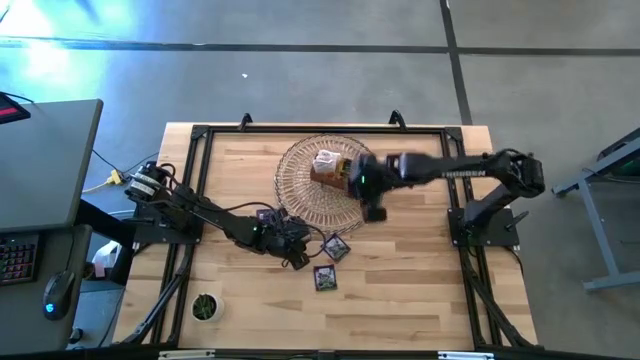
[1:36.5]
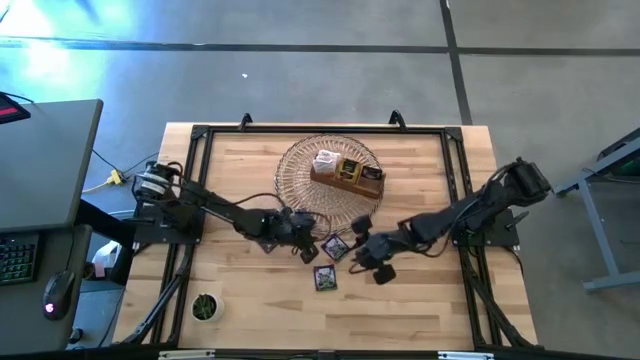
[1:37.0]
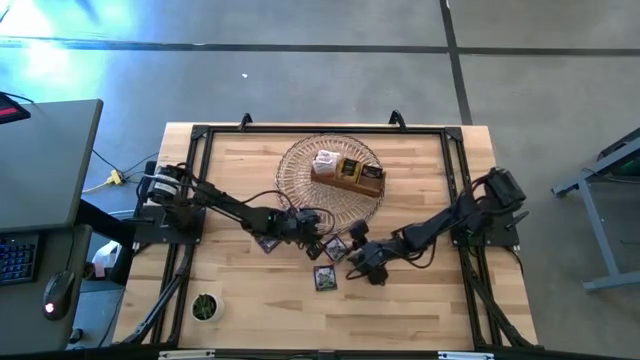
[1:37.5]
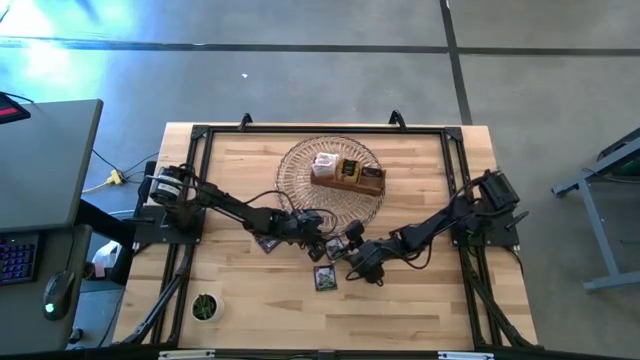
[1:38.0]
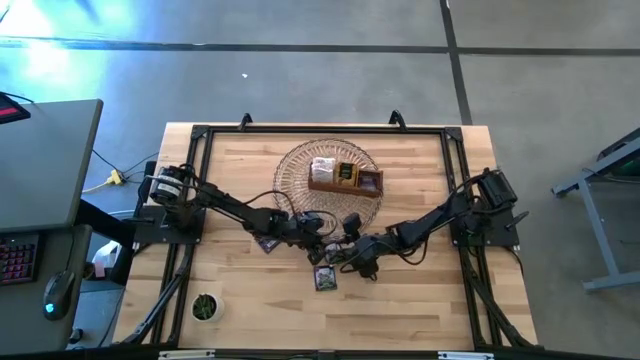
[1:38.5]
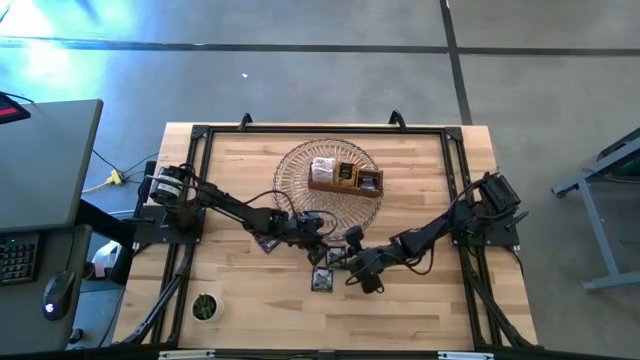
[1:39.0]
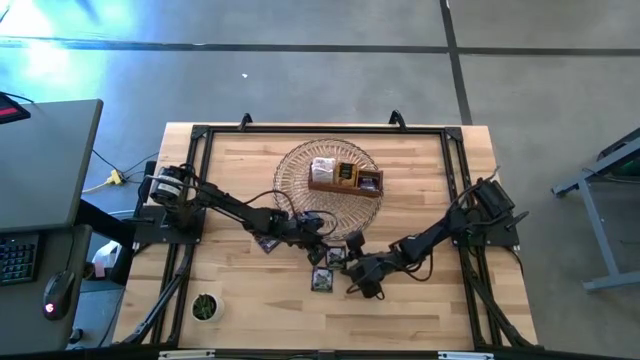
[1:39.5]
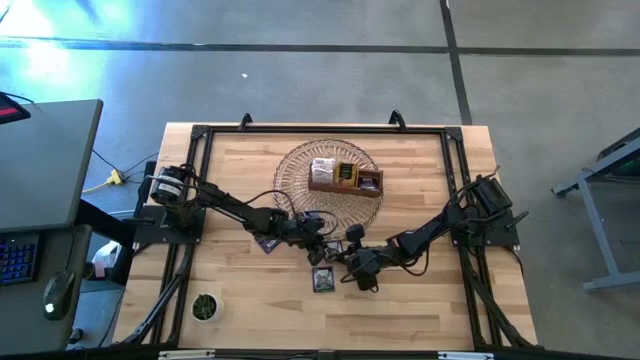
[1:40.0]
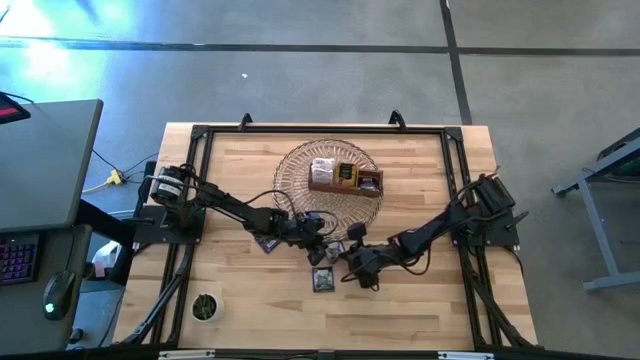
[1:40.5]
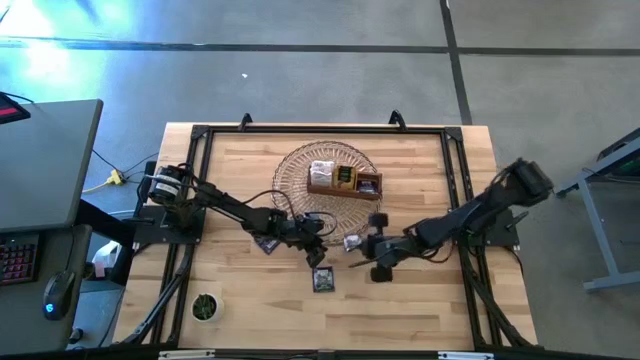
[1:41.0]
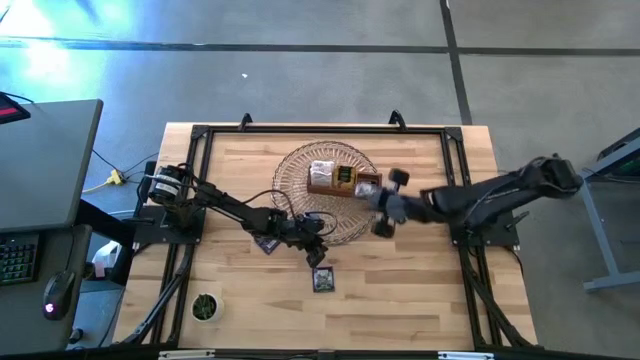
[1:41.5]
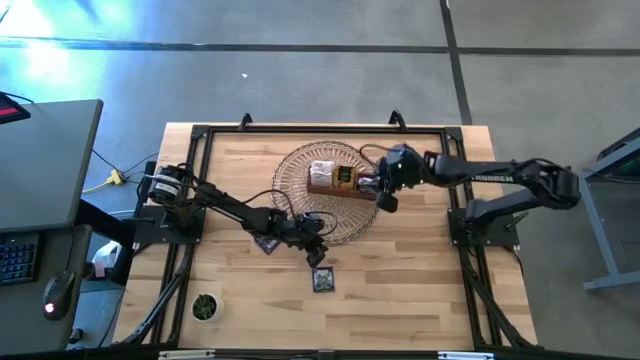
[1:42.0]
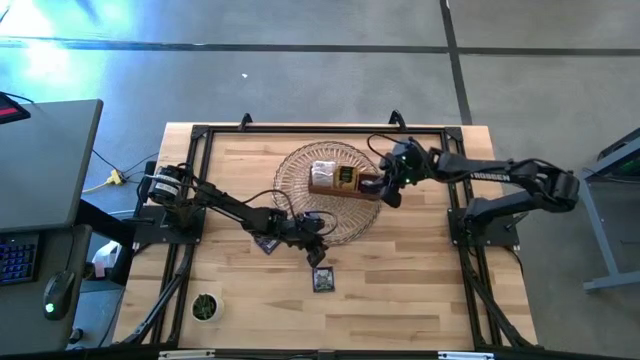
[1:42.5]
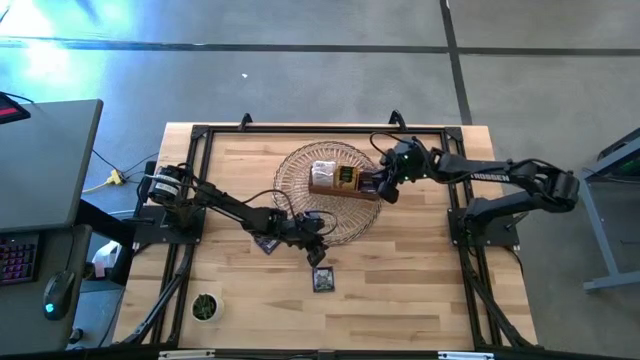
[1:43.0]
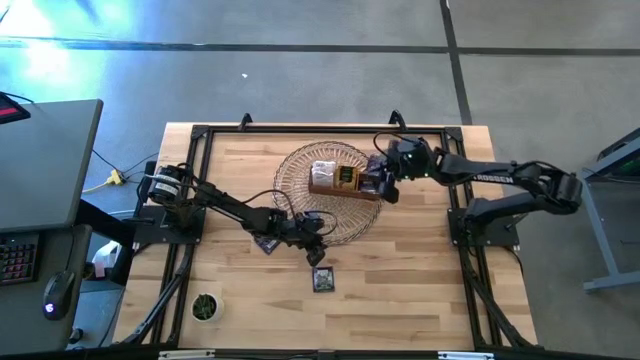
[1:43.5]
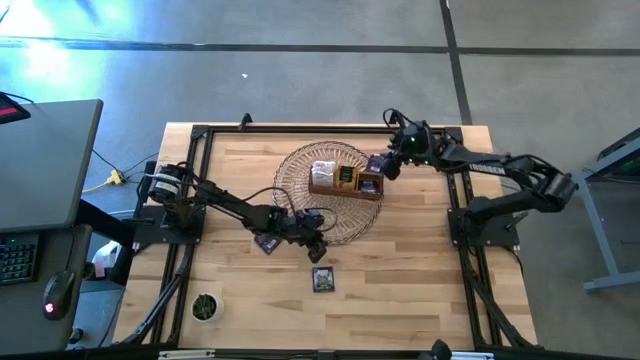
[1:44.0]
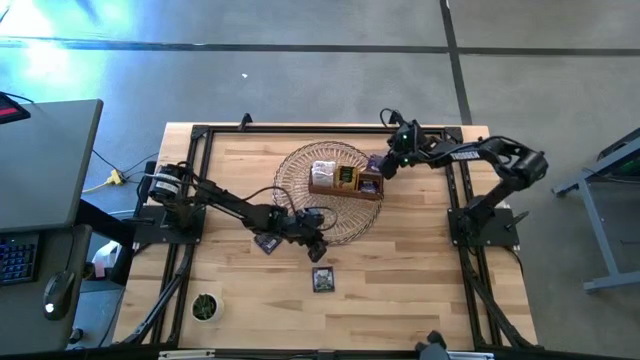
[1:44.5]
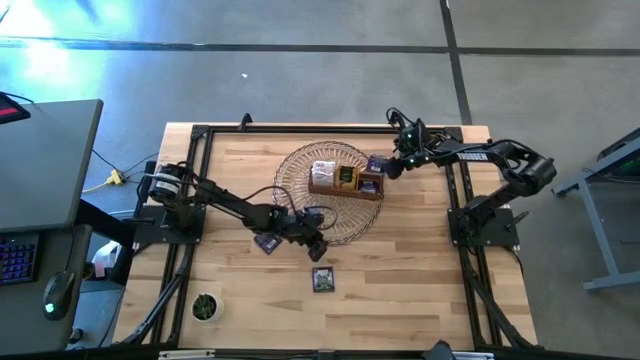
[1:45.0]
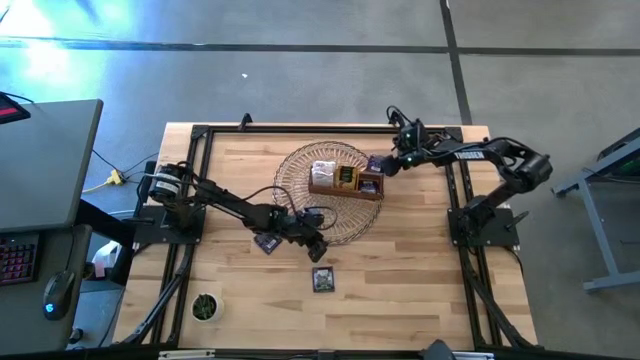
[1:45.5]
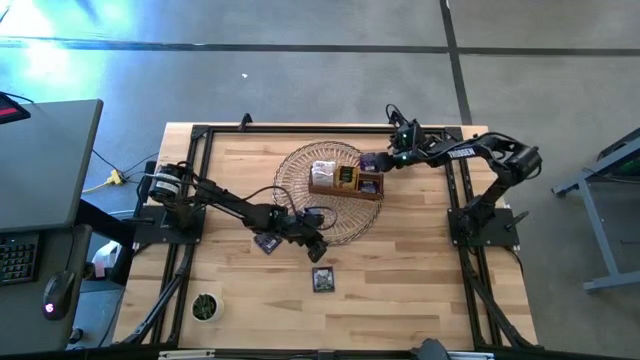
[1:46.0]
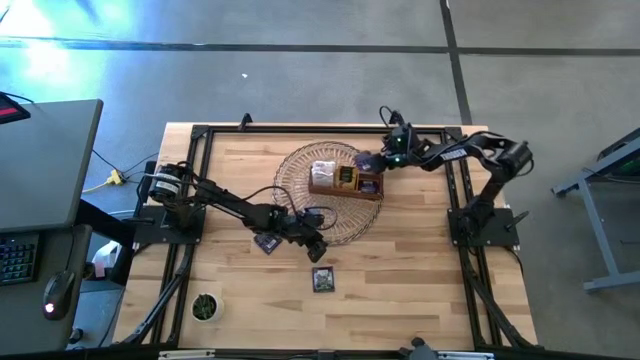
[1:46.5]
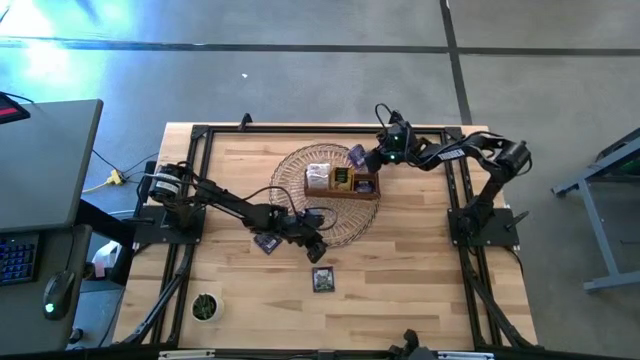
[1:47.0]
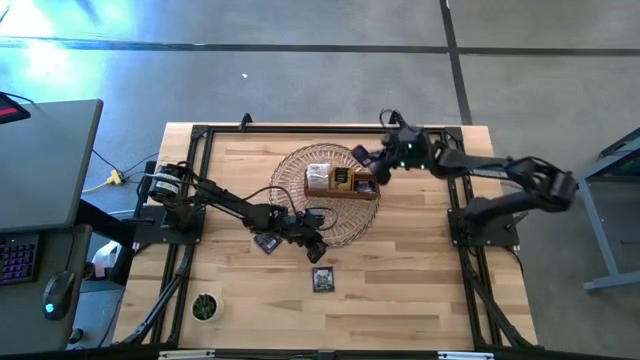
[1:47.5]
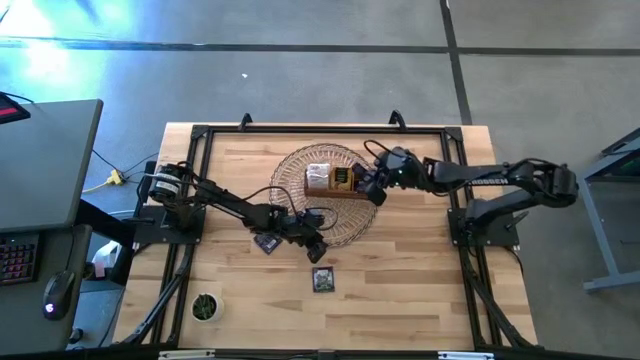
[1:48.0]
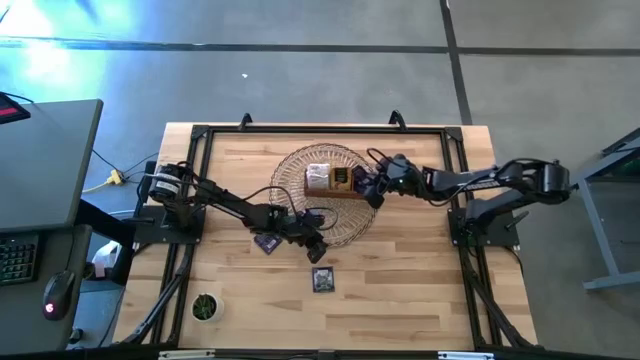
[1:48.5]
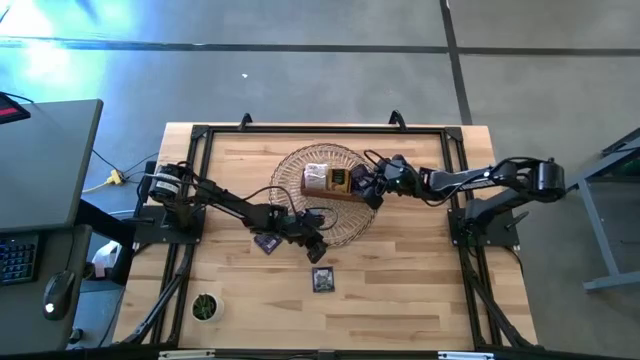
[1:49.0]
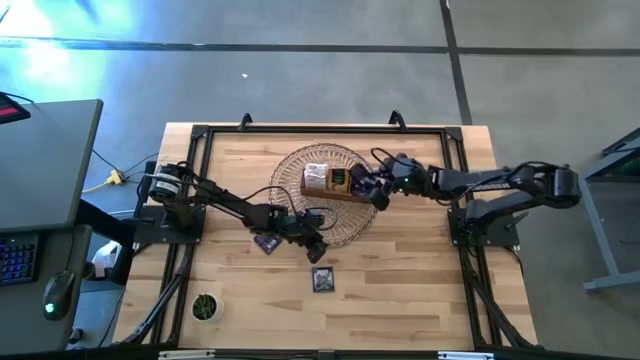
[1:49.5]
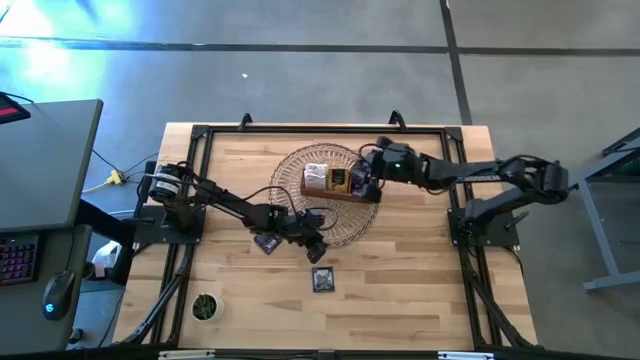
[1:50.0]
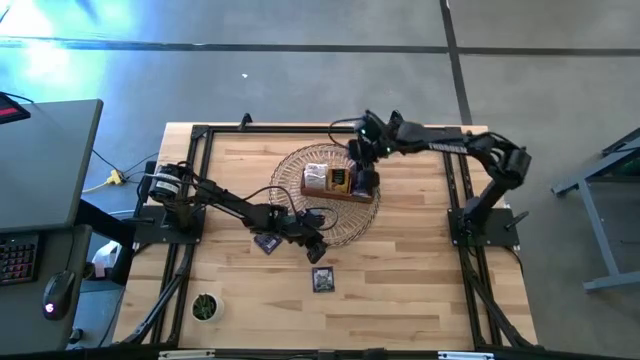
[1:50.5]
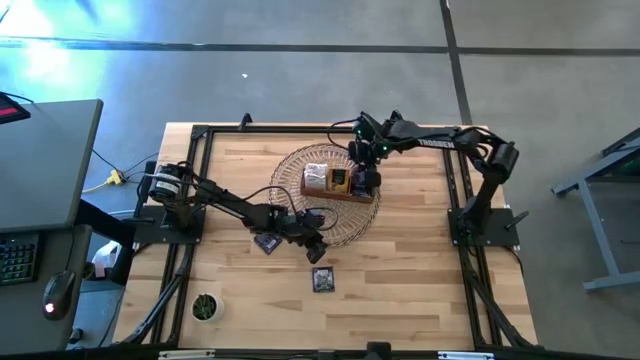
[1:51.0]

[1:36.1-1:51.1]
Task: Pick & Place Tea
Put the purple tea bag into the right section of the wooden organizer

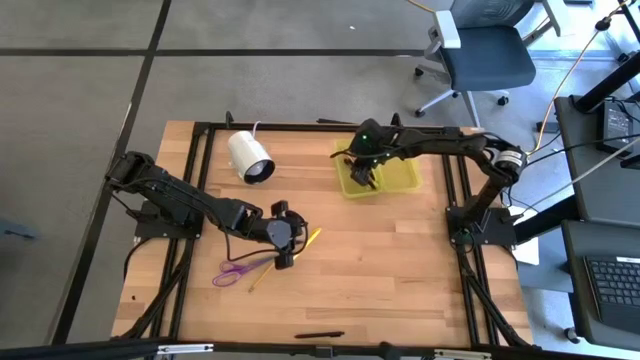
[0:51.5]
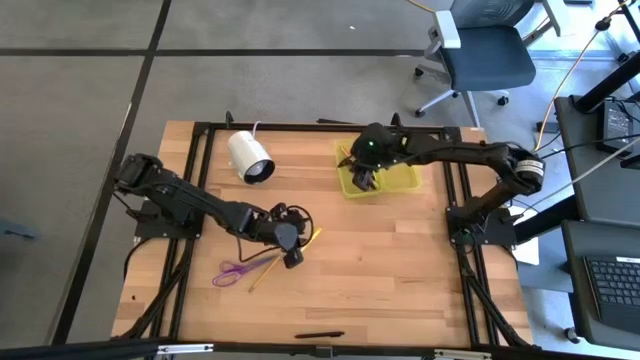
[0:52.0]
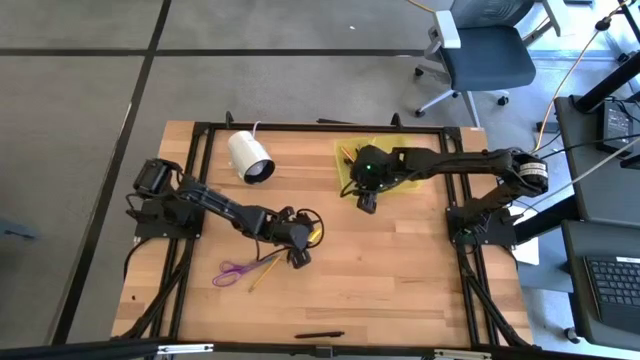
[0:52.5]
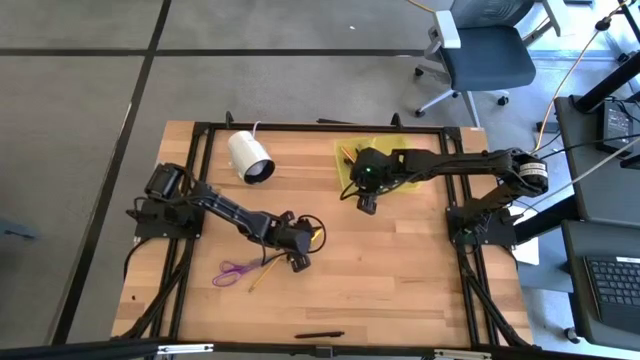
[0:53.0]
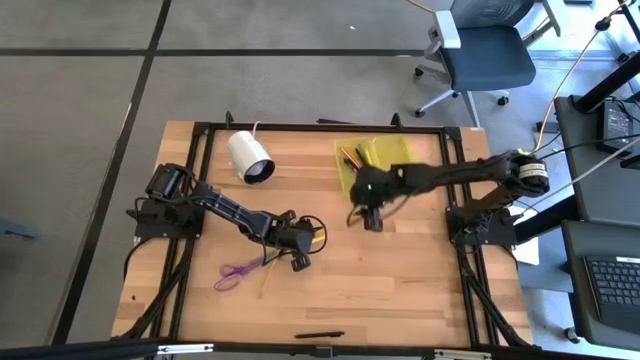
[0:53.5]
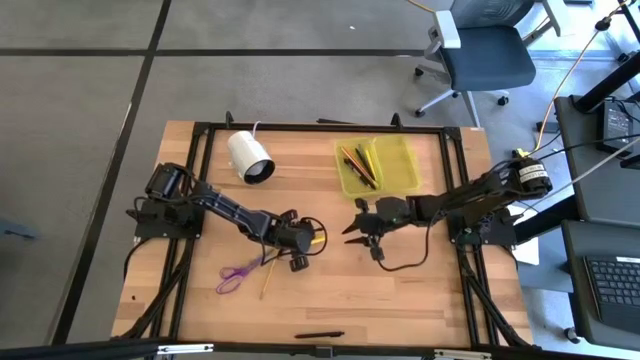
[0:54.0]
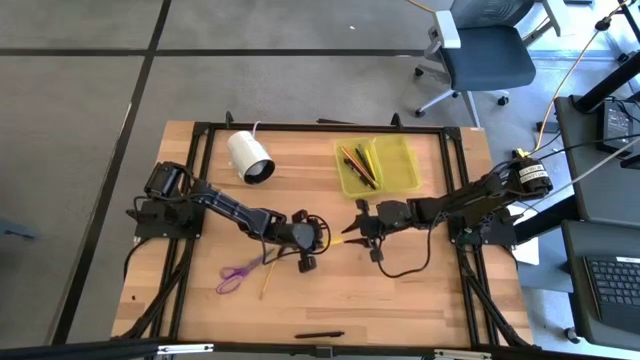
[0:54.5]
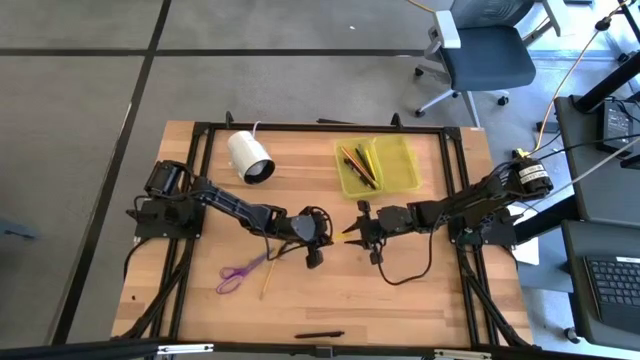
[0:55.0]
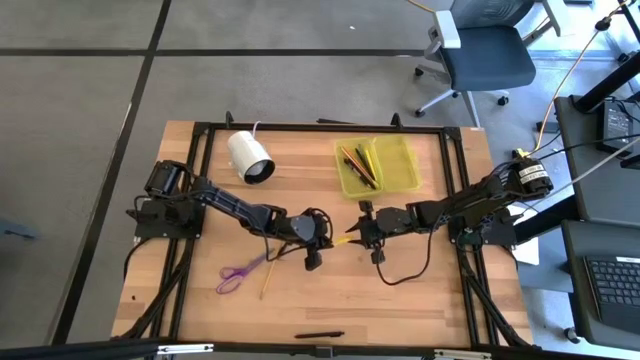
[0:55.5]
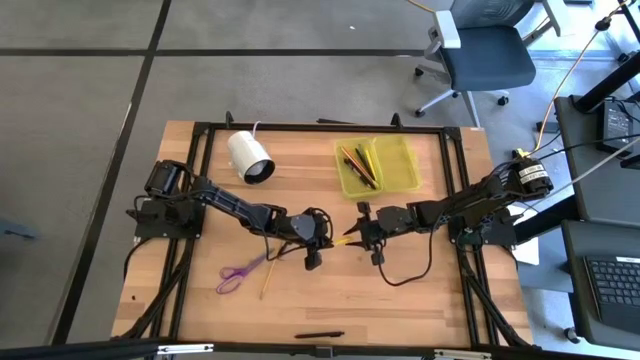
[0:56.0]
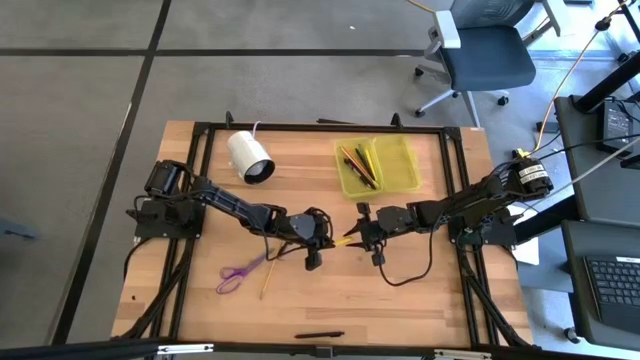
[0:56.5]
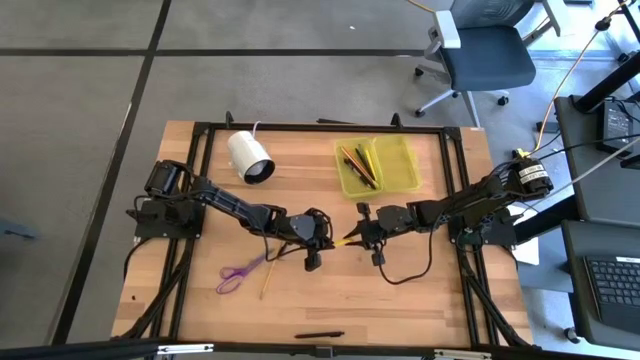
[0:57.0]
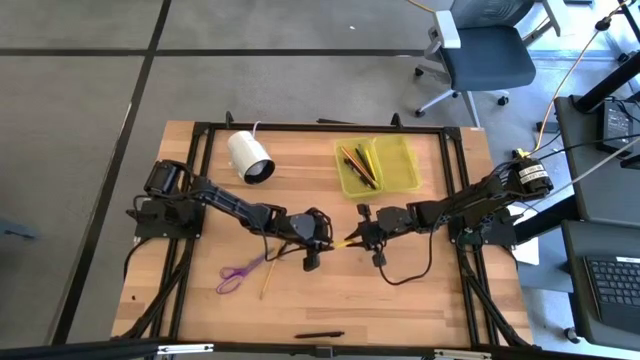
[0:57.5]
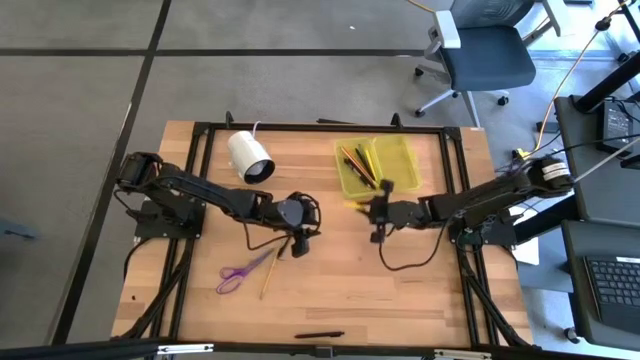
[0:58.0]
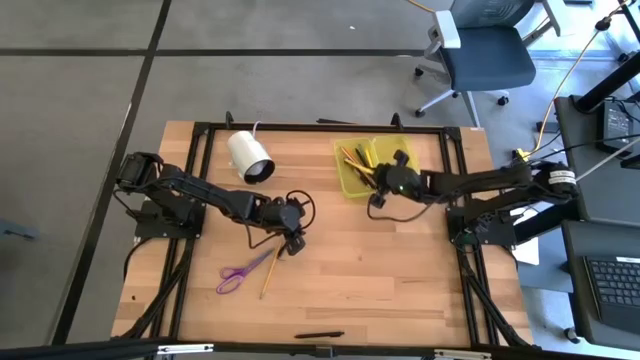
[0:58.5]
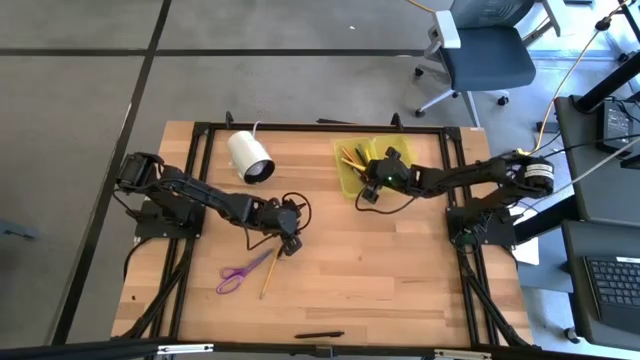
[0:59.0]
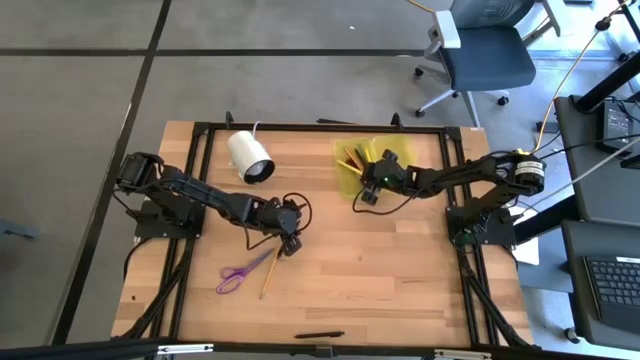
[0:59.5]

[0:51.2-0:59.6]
Task: Pick & place school supplies into a supply box
Put the yellow pen into the yellow supply box
